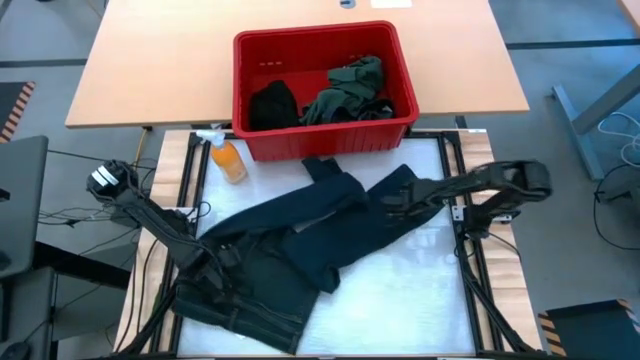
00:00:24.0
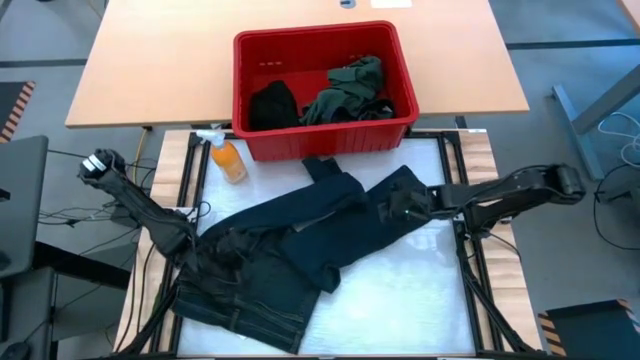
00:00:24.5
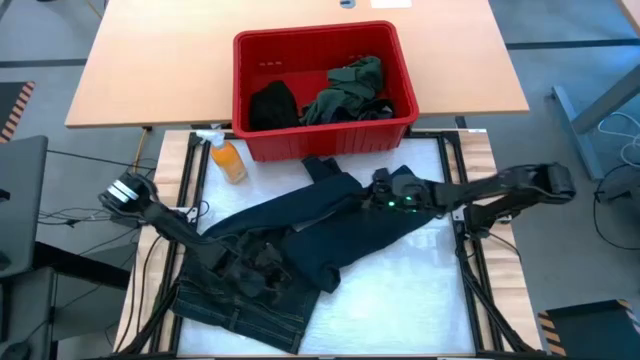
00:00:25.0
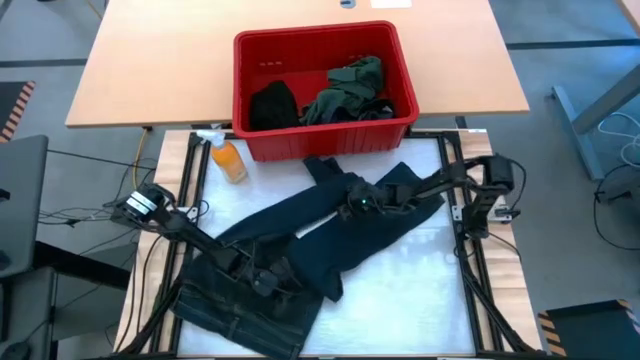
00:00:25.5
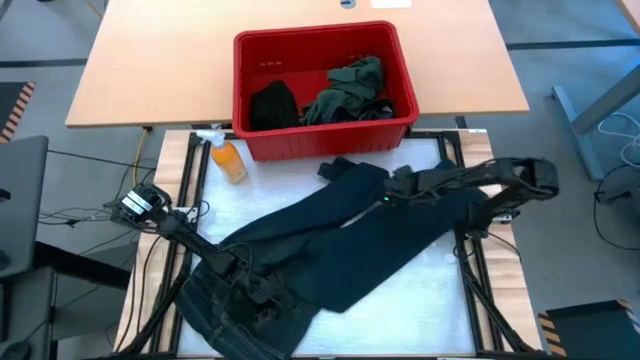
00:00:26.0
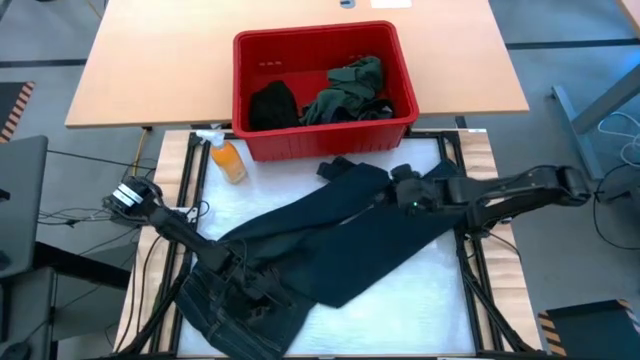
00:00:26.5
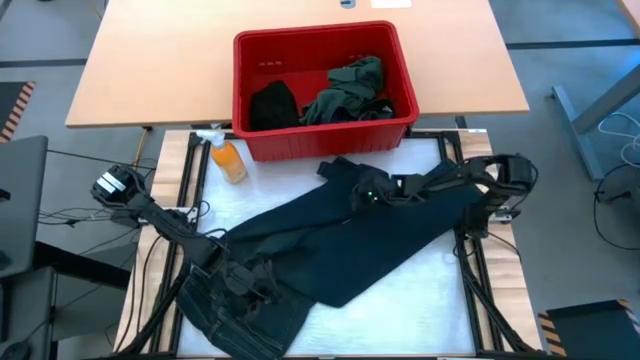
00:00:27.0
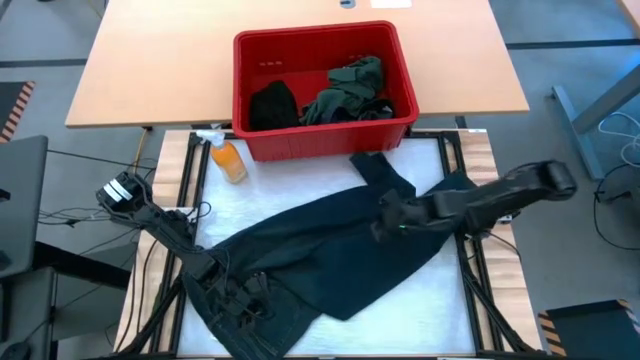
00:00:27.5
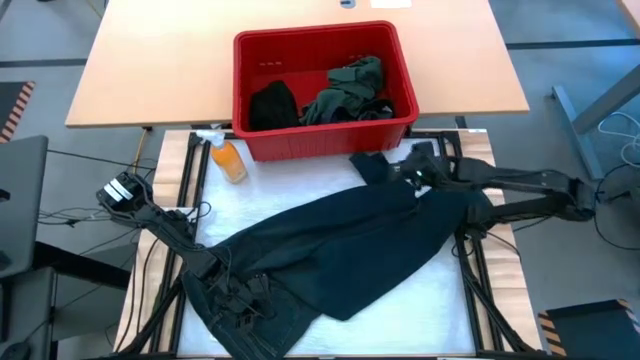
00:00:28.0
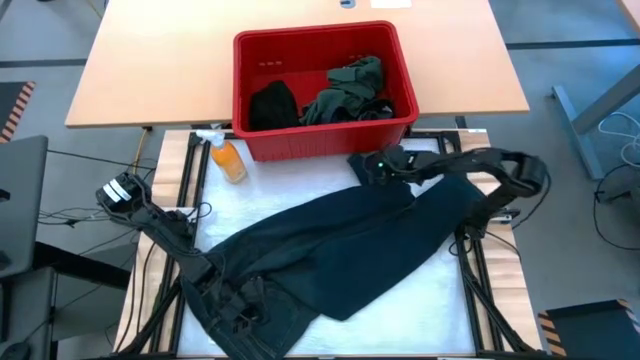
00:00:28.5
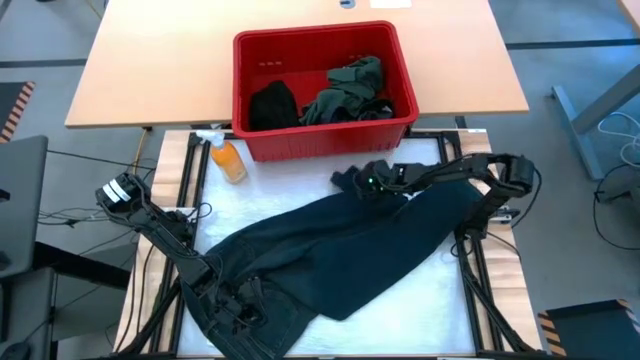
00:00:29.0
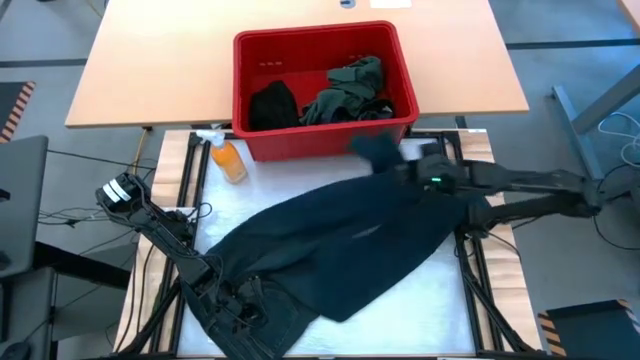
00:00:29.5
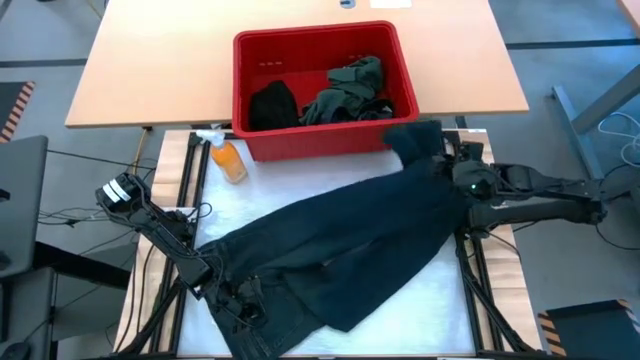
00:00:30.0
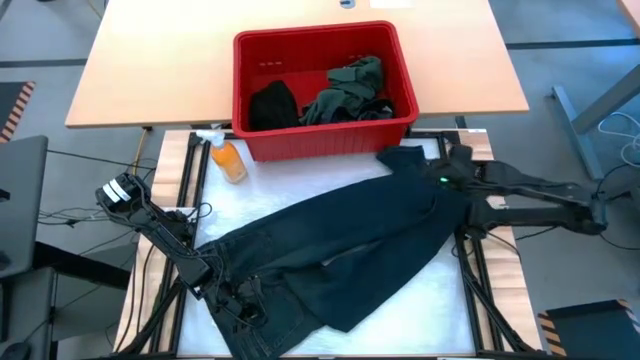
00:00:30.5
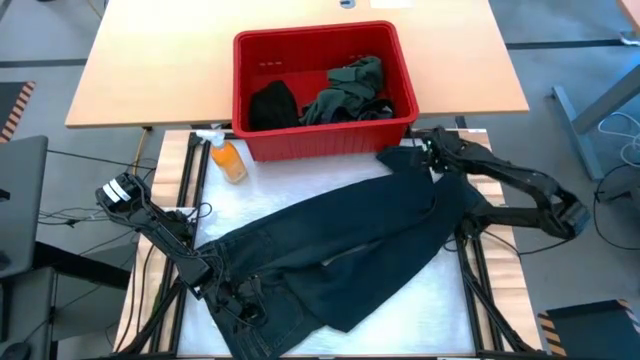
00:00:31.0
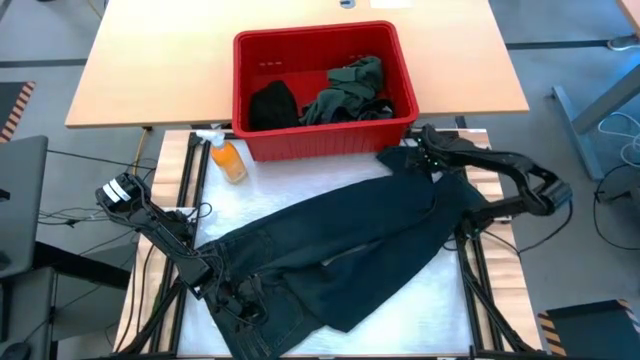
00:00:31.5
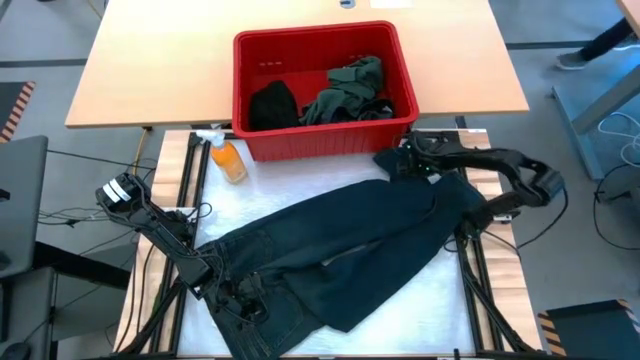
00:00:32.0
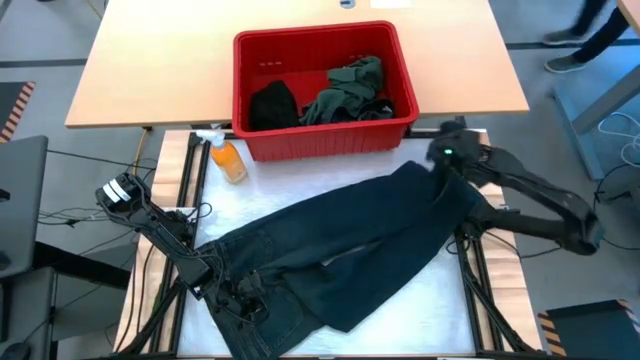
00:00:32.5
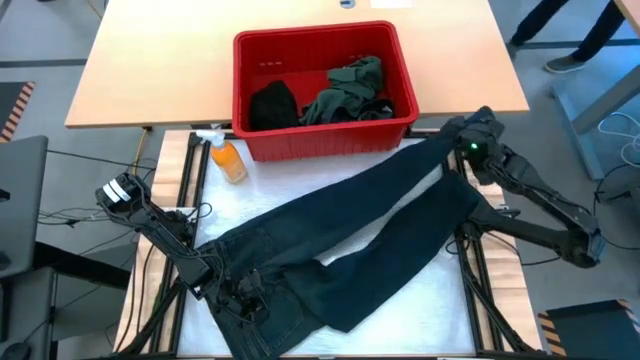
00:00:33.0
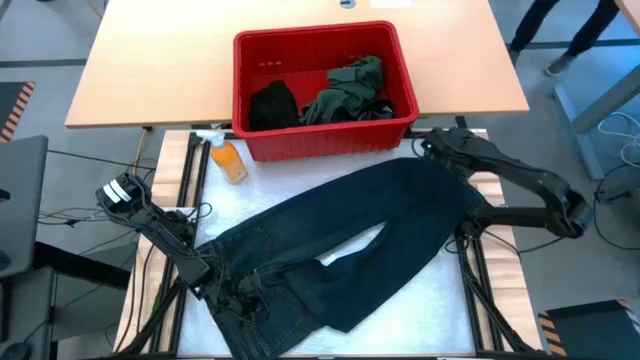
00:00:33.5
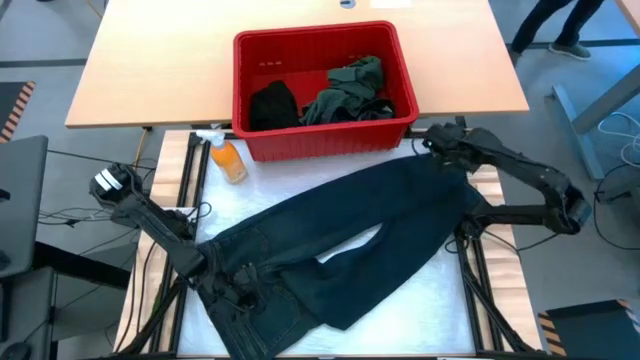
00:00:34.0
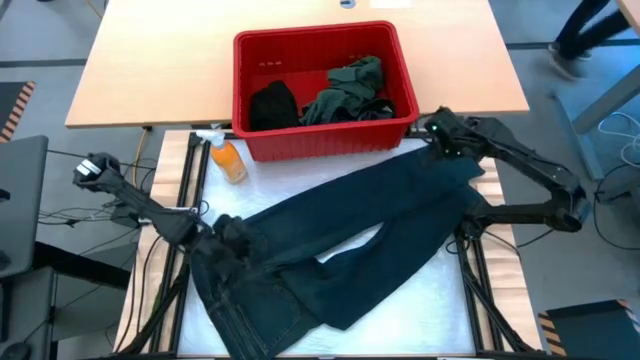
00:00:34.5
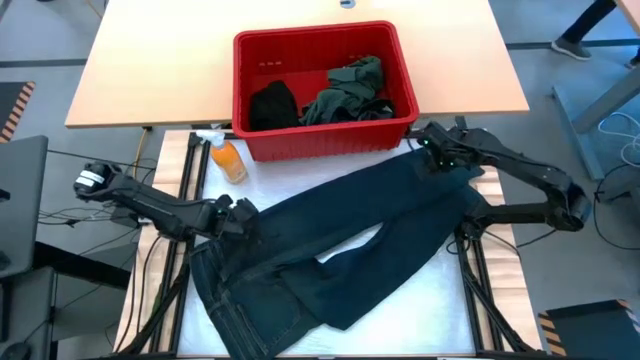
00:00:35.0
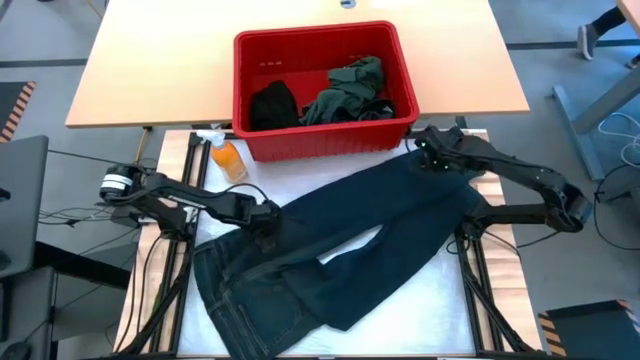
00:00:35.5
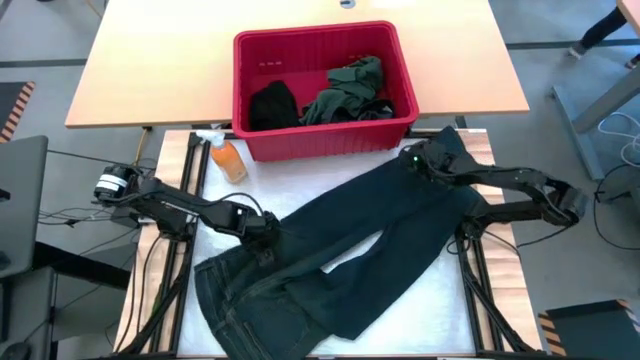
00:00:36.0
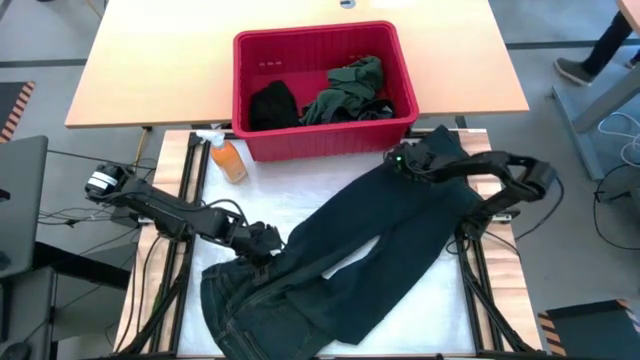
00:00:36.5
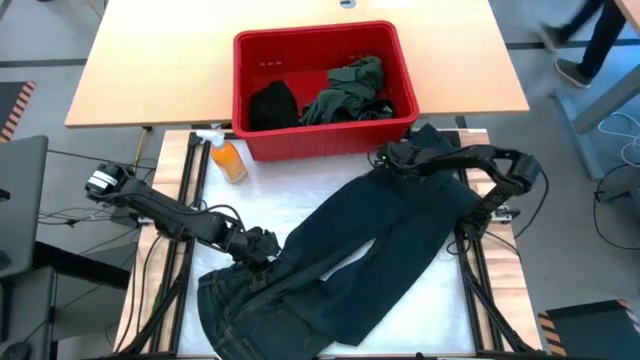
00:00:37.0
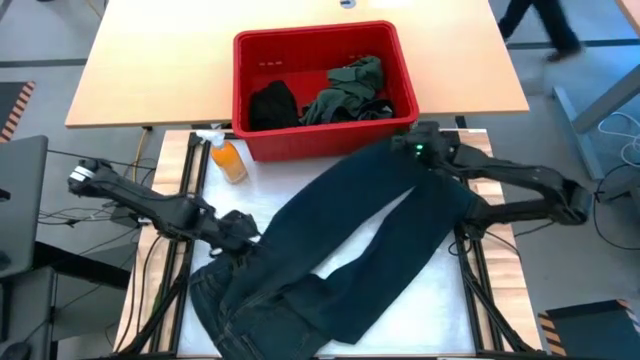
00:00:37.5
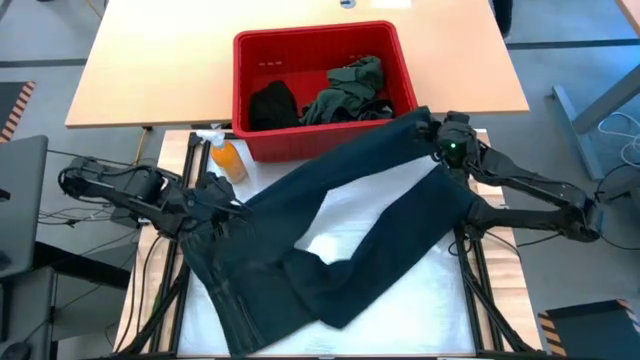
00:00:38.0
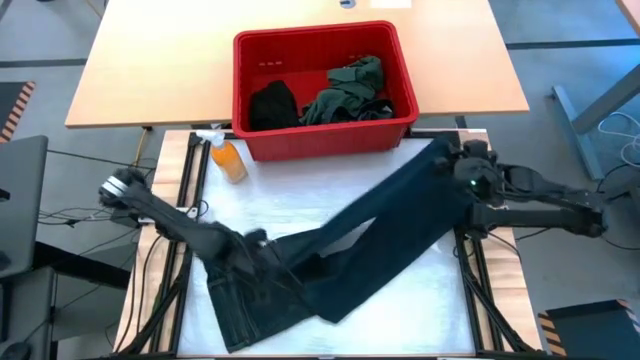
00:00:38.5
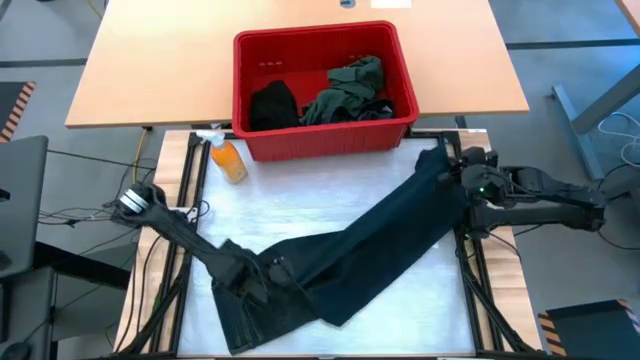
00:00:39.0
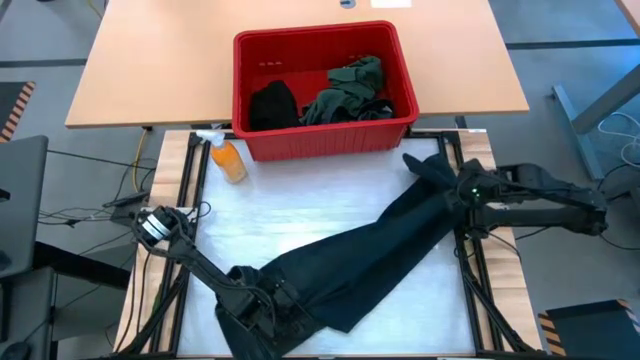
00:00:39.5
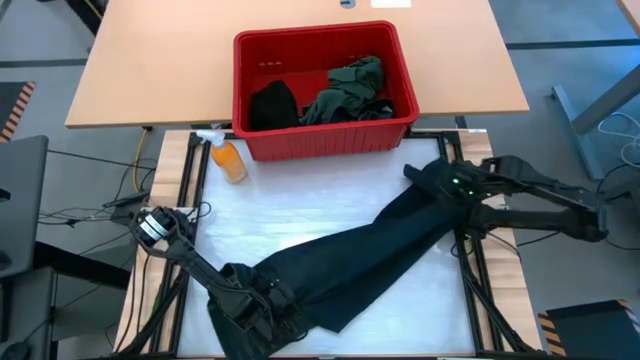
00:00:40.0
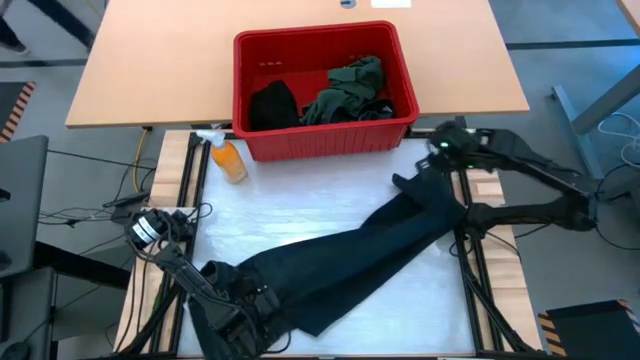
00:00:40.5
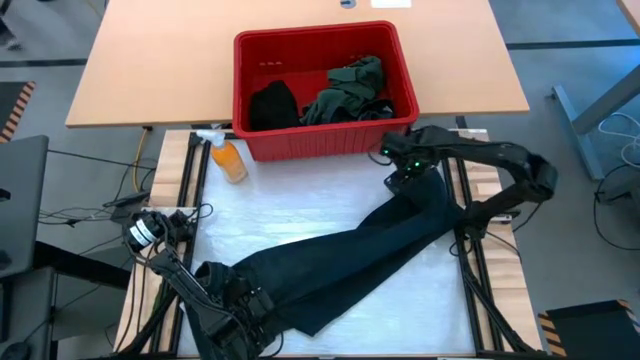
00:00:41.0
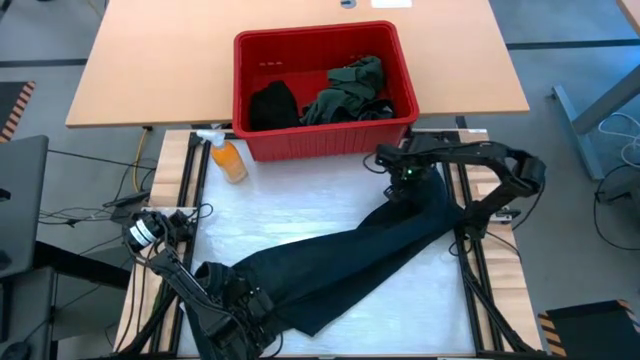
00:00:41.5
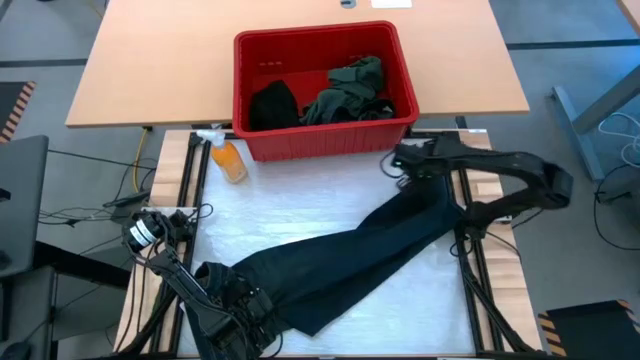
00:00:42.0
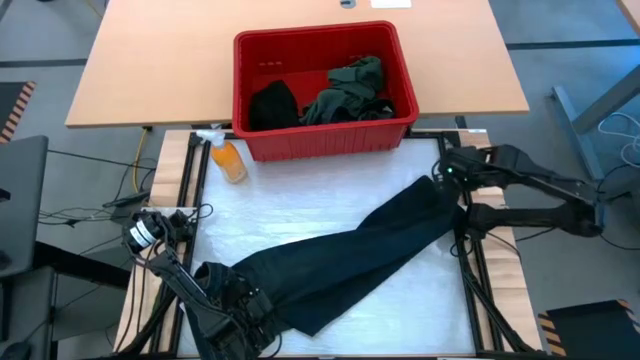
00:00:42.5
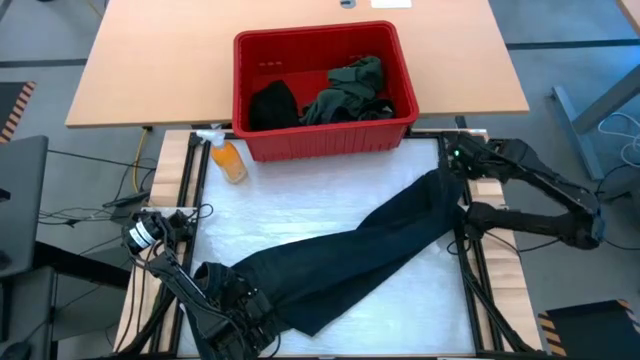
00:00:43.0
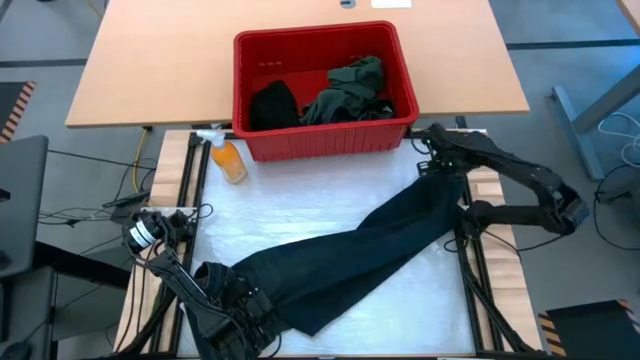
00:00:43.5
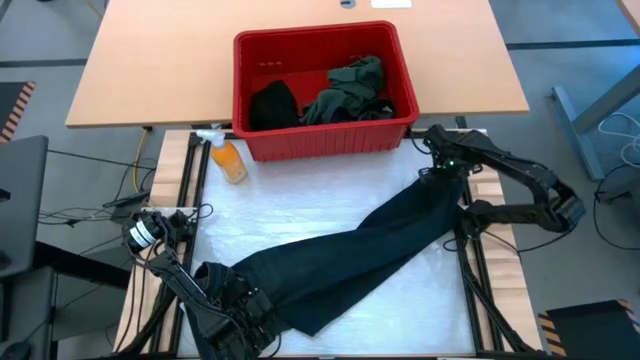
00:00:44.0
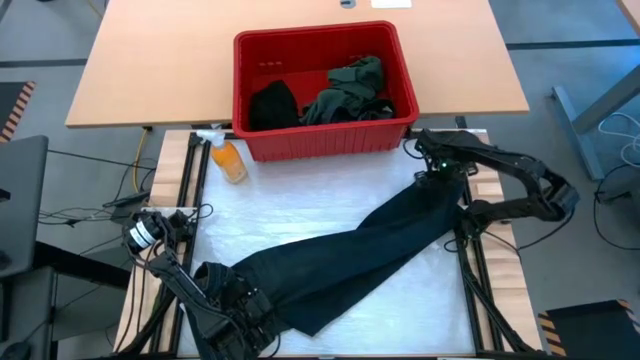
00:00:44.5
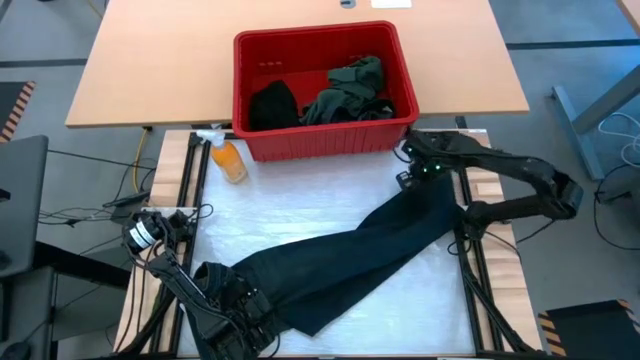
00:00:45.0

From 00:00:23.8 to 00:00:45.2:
Task: Fold Laundry from Bin
Fold the dark blue pants

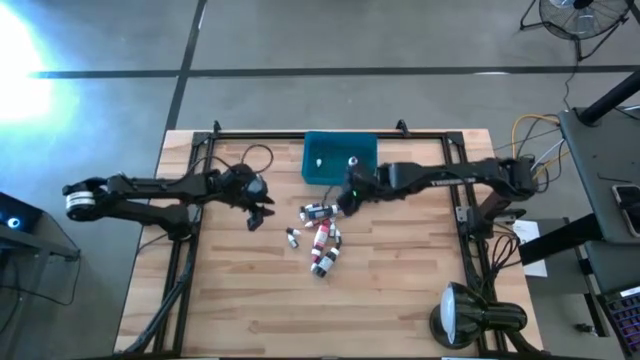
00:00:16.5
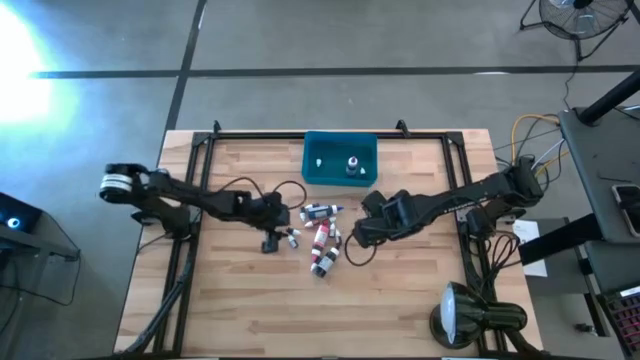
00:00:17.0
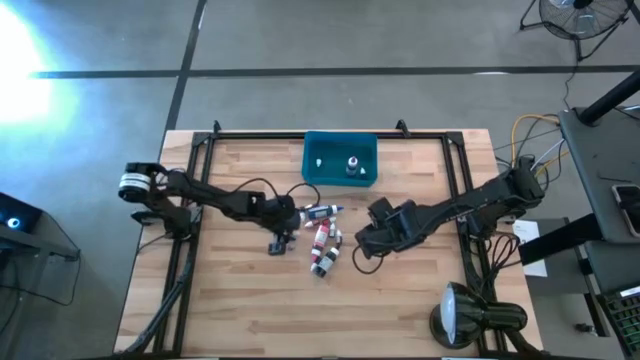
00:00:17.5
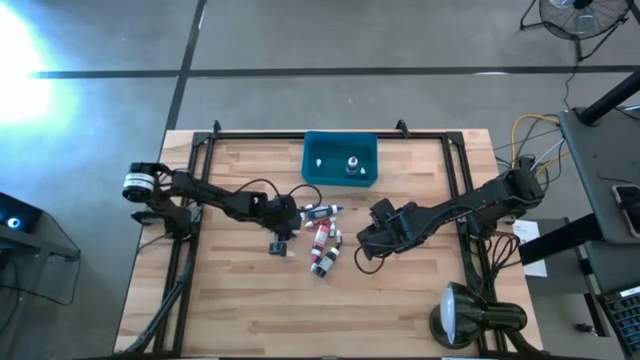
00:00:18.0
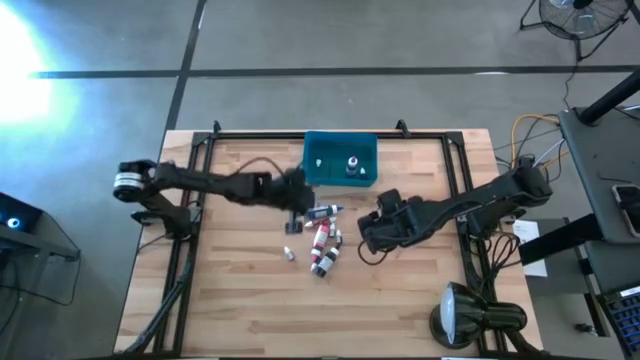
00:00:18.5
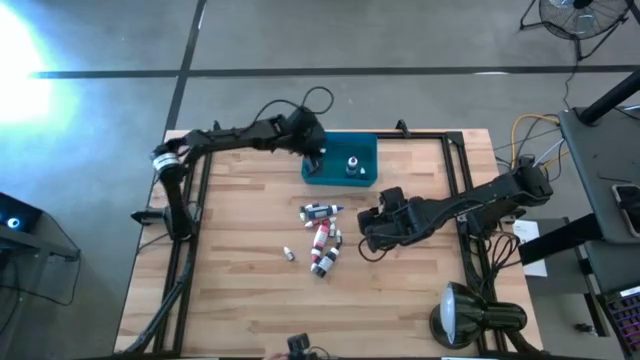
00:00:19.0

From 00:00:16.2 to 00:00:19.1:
Task: Pick & Place food coloring
Put the top small black food coloring bottle into the blue bin
